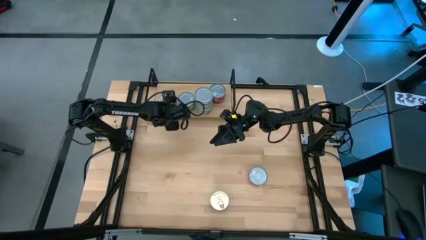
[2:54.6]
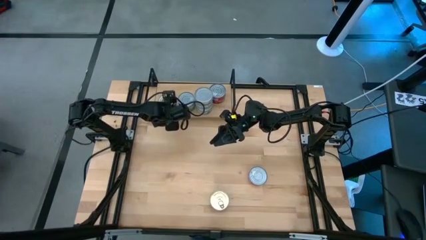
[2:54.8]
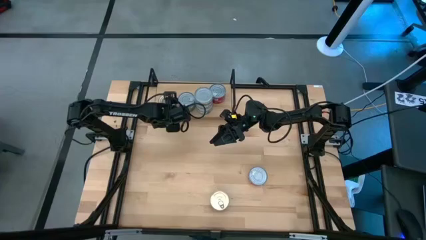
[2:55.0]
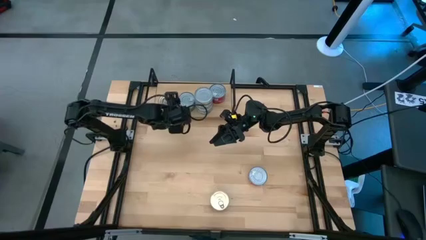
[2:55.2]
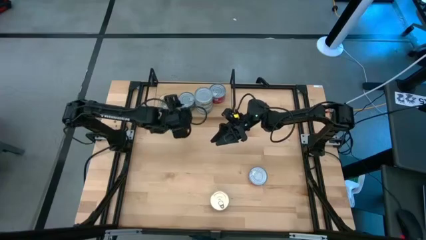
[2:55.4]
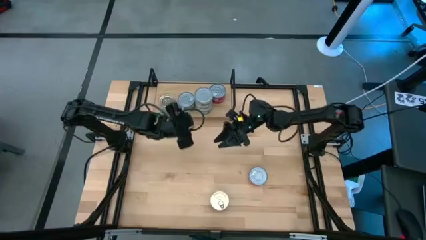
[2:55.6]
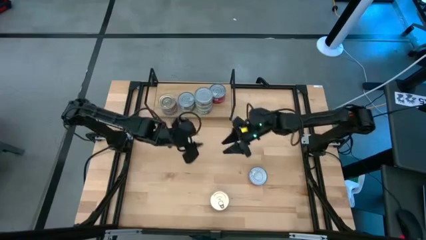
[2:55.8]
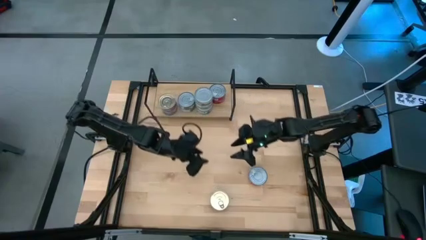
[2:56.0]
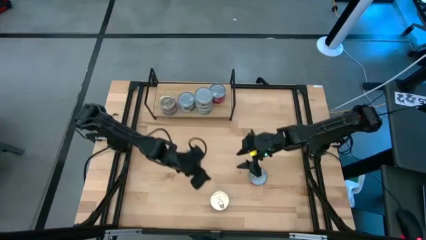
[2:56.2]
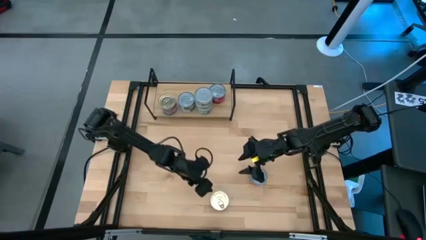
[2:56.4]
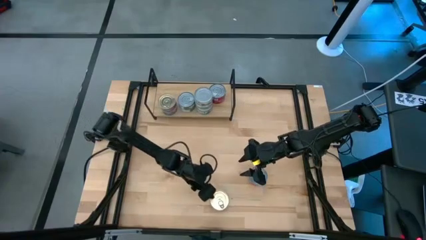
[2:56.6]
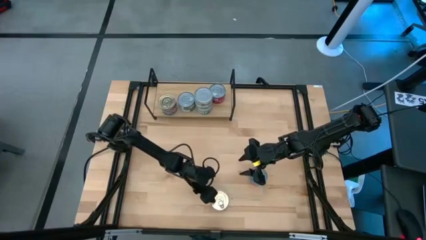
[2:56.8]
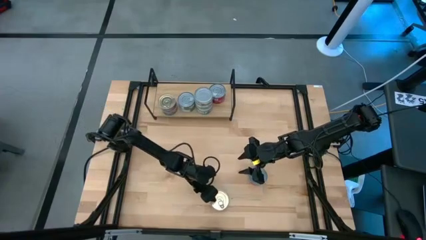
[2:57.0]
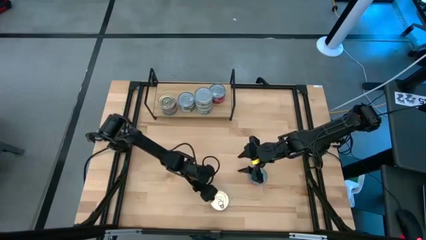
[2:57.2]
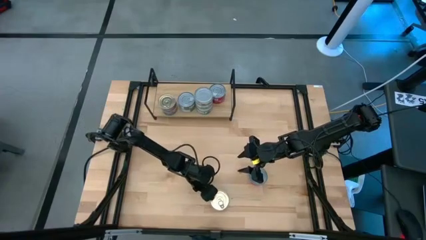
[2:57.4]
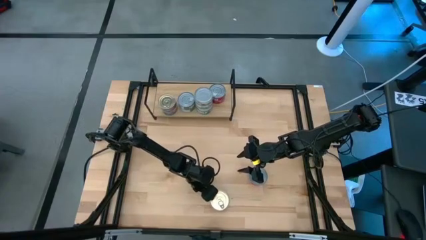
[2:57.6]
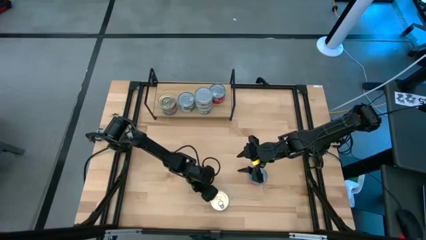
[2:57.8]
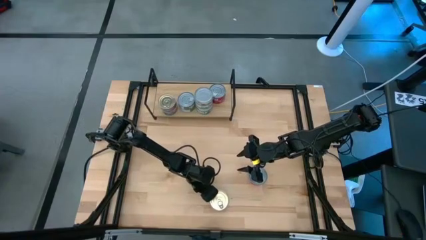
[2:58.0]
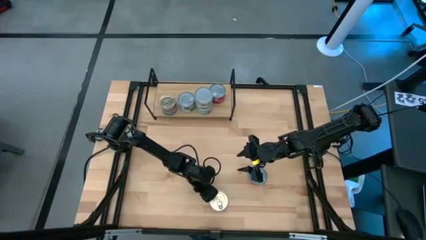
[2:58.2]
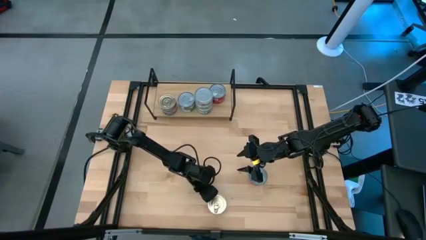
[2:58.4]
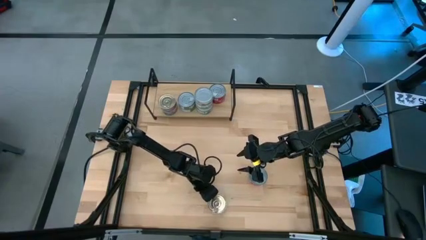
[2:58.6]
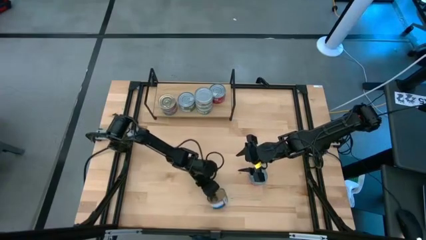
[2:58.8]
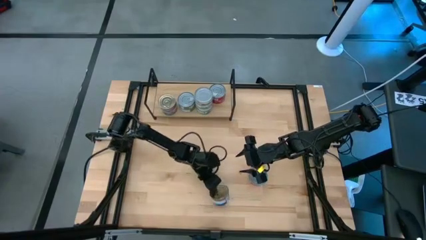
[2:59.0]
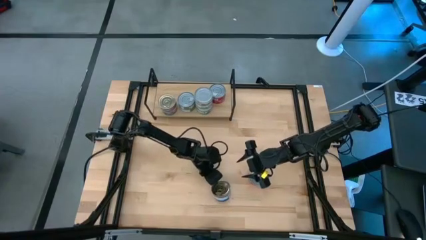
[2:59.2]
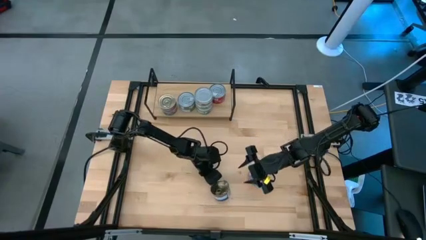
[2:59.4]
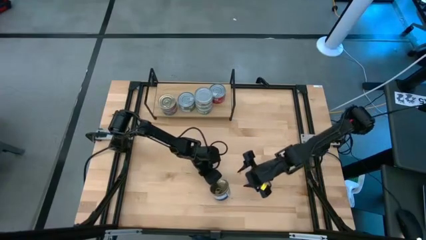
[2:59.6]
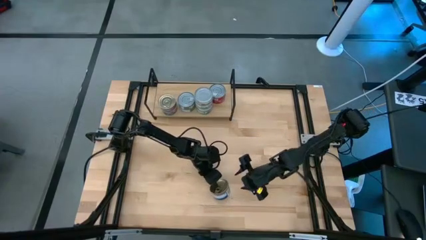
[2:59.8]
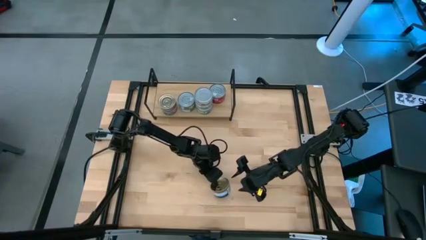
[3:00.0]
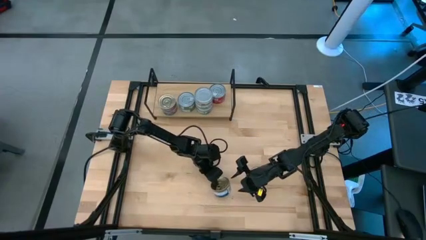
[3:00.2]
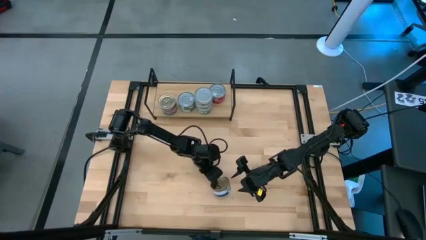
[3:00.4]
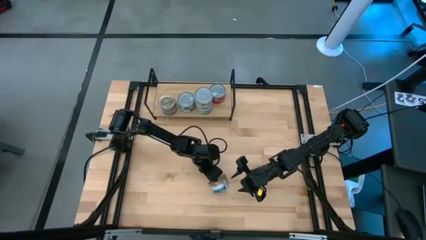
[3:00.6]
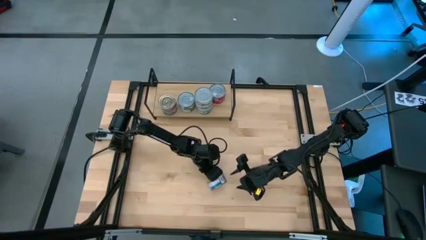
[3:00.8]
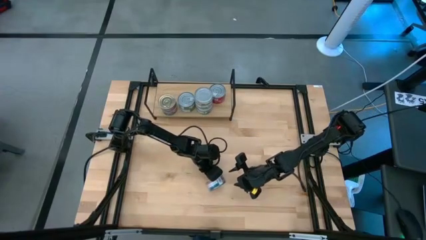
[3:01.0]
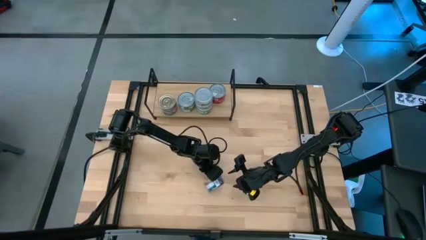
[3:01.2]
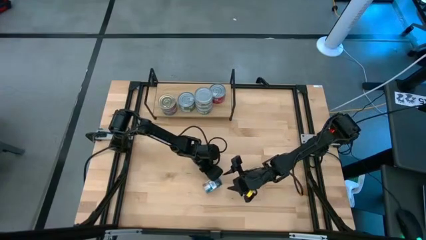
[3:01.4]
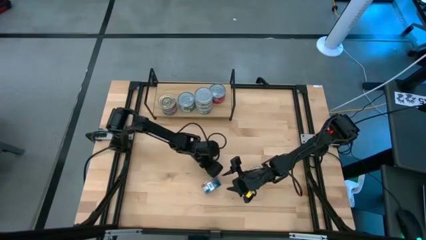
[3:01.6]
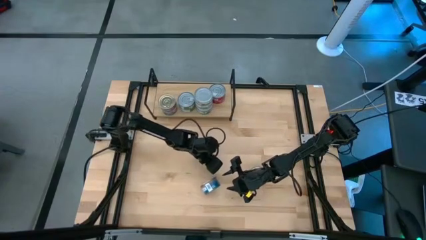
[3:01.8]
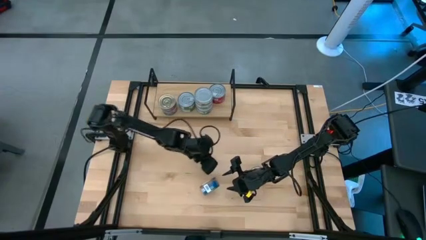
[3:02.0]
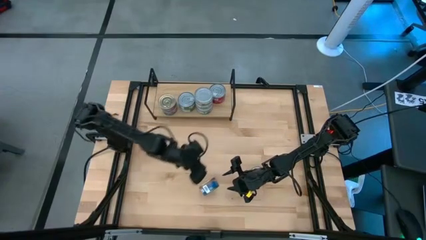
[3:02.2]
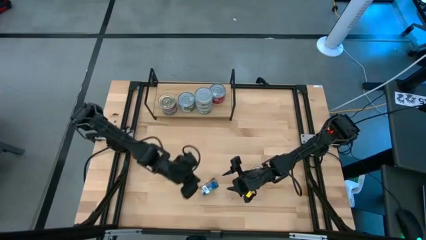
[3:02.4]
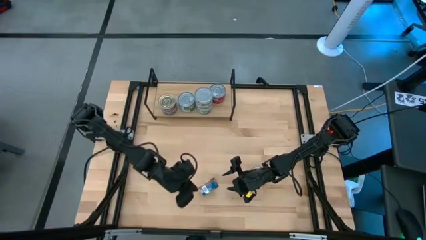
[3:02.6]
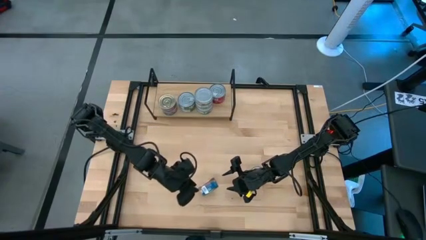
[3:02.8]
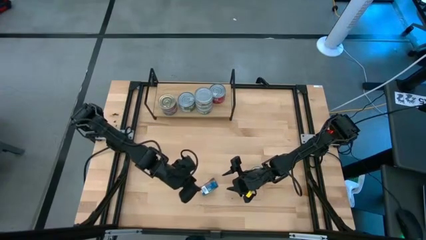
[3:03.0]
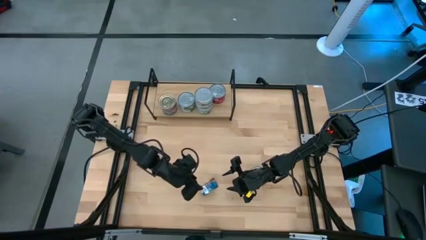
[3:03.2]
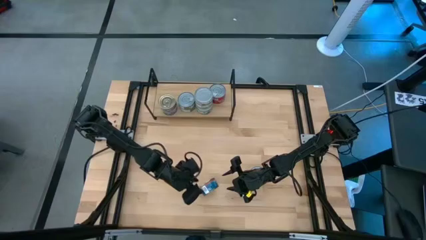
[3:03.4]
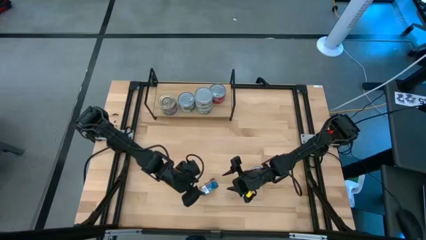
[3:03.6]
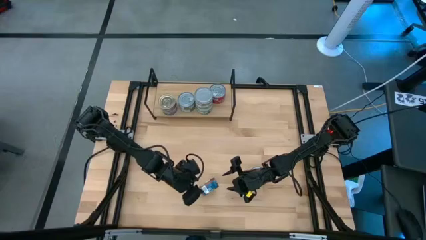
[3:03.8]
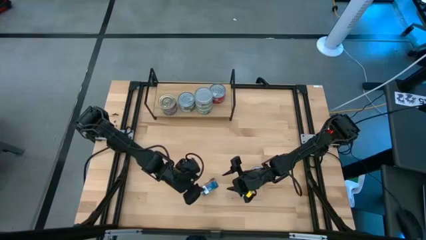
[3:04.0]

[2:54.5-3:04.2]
Task: Stack canned seafood by type on shelf
Stack the blue tuna can on top of the other blue tuna can on the shelf

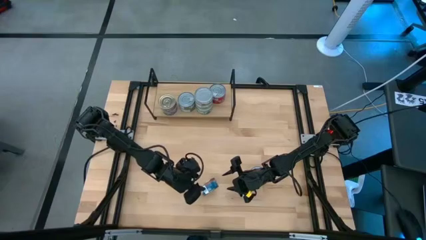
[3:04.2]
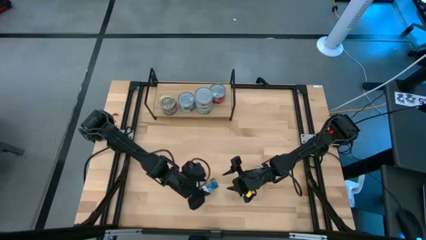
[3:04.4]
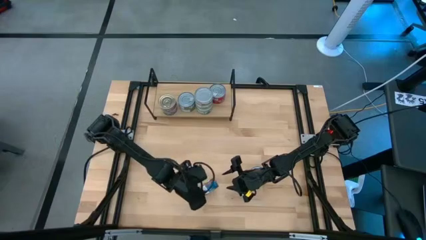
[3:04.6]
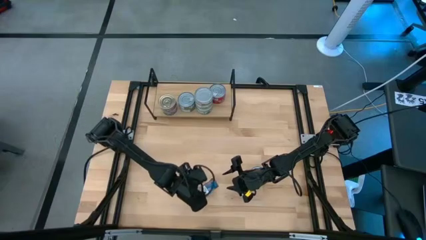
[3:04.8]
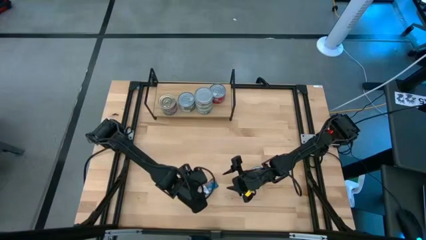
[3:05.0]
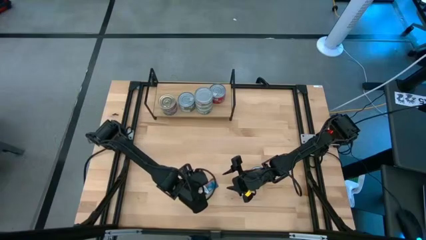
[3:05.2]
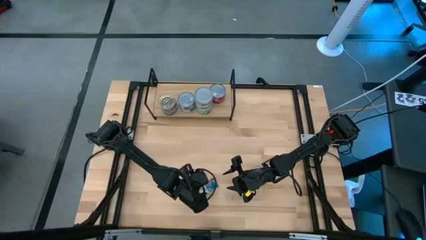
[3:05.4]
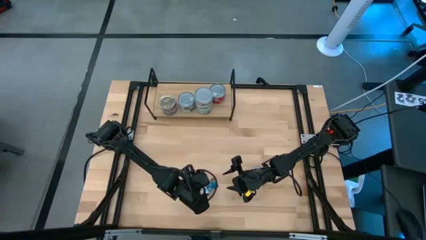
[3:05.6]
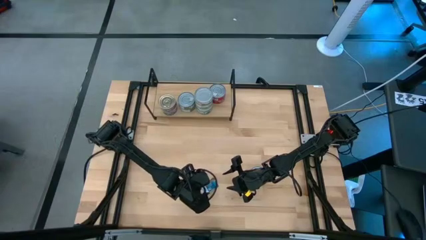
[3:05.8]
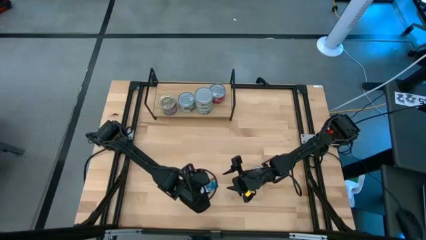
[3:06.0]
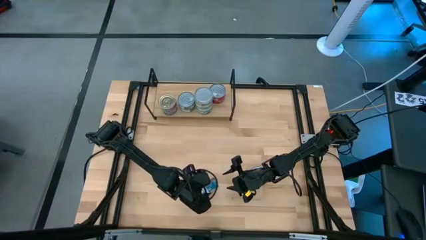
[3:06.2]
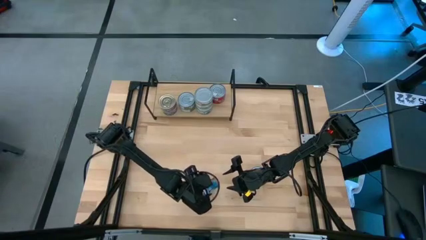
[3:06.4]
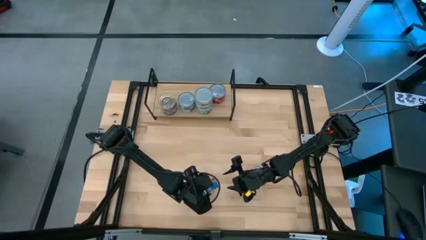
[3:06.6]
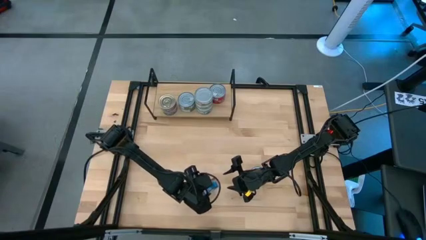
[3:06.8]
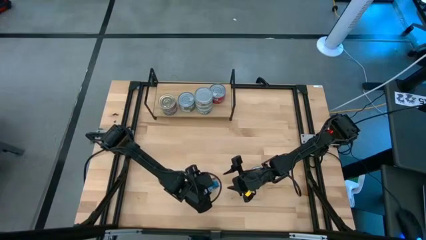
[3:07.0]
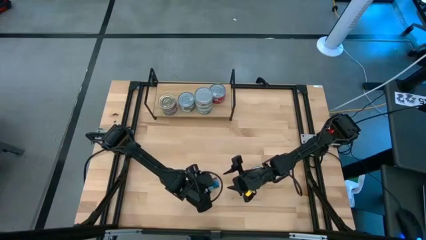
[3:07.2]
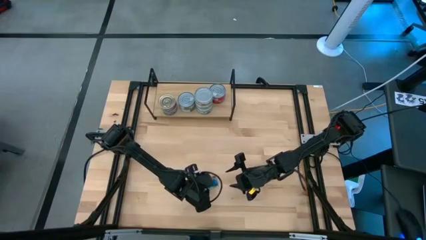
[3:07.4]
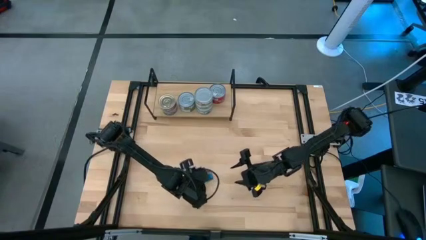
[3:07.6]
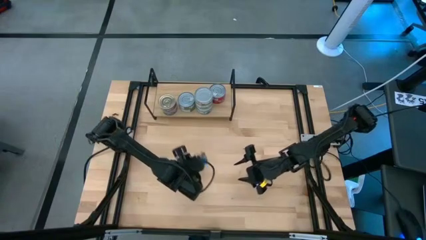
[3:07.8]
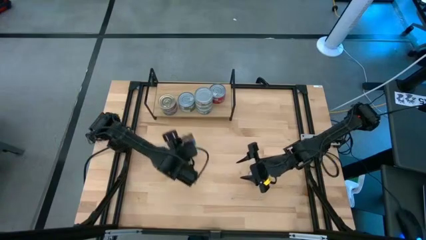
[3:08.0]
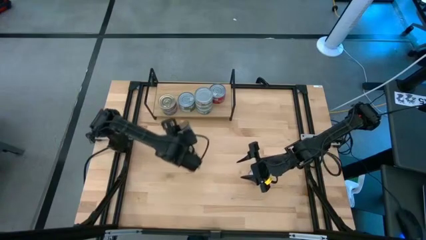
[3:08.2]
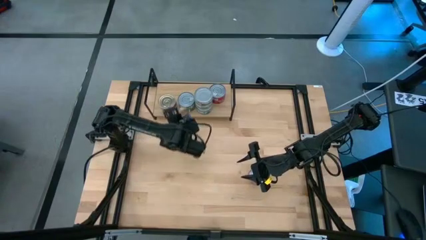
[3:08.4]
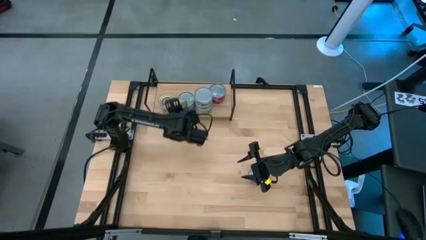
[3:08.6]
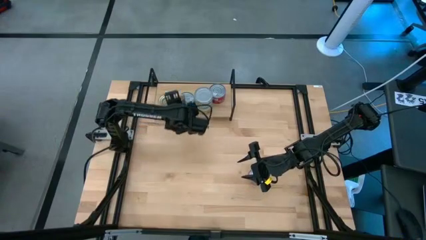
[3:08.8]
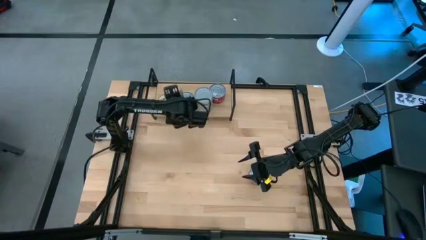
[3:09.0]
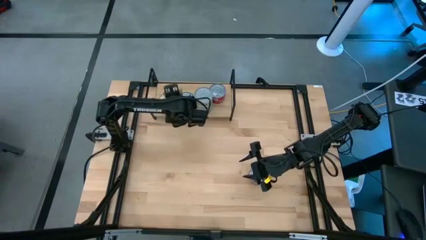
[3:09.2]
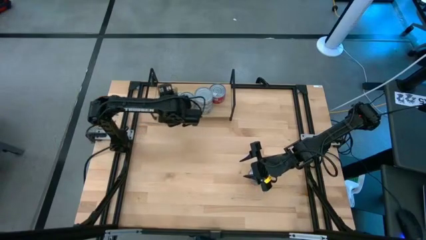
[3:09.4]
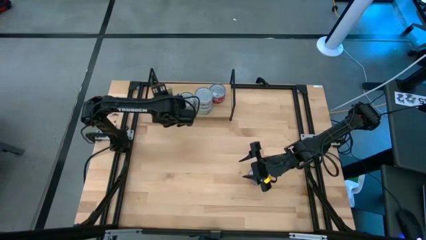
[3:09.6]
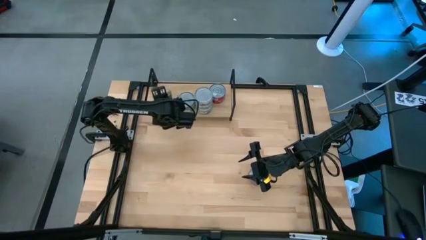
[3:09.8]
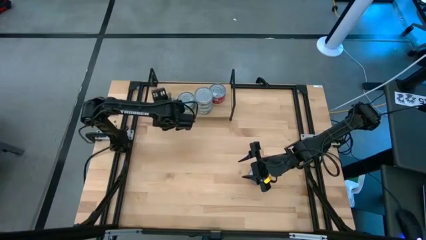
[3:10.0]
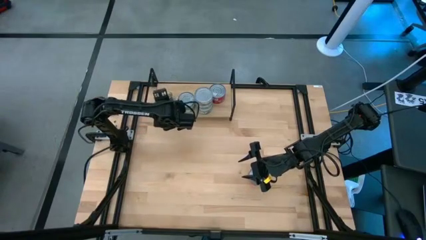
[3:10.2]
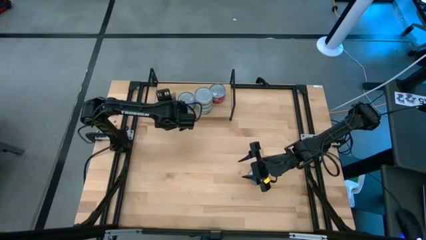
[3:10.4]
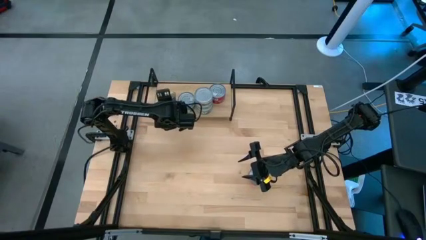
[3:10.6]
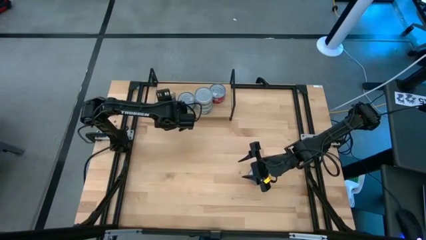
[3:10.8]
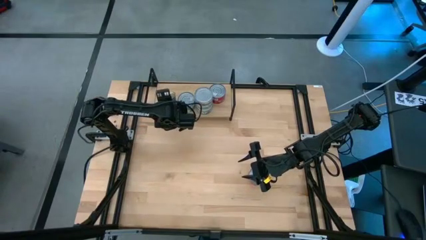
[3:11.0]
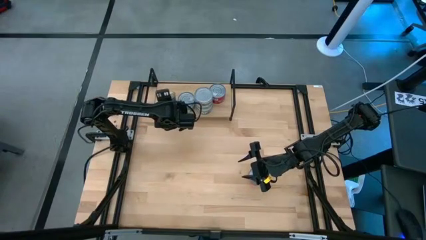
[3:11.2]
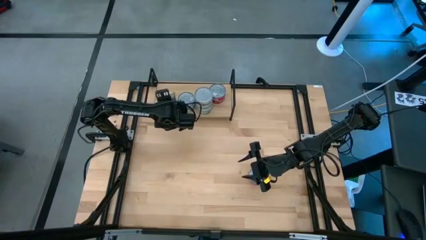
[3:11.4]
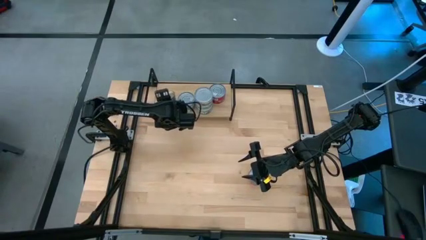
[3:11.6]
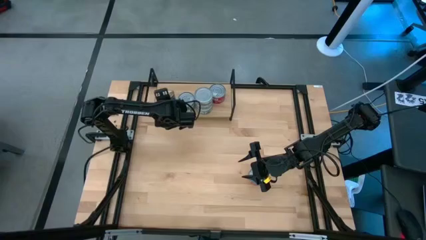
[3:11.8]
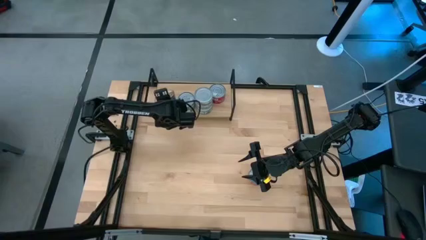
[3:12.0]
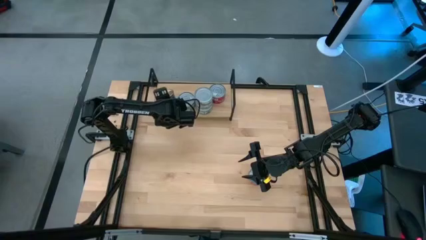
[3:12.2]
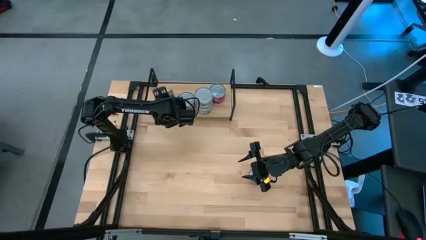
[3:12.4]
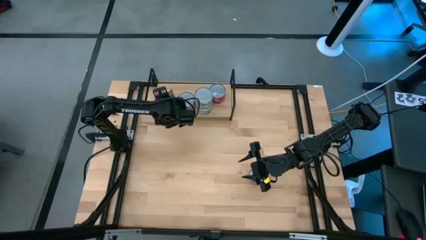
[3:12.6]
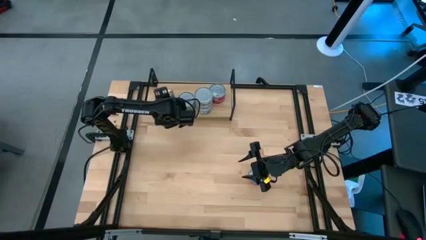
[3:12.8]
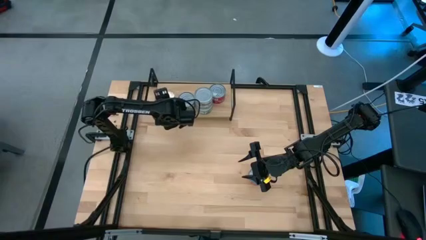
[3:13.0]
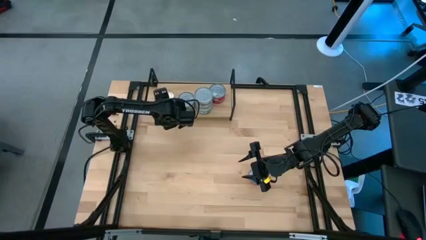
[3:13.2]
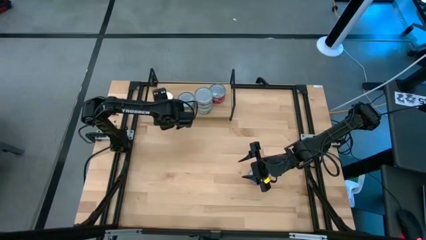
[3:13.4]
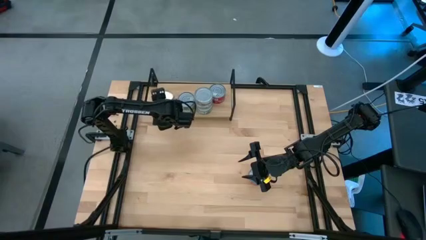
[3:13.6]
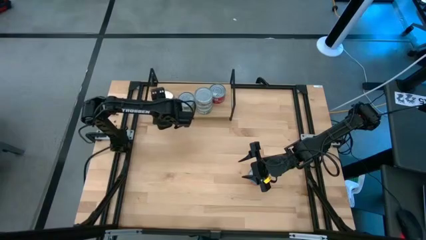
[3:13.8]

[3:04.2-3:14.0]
Stack the blue tuna can on top of the other blue tuna can on the shelf
